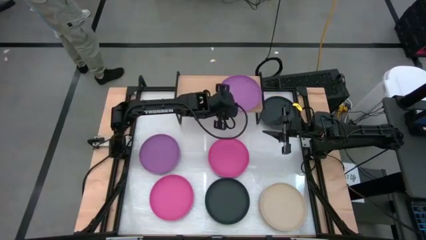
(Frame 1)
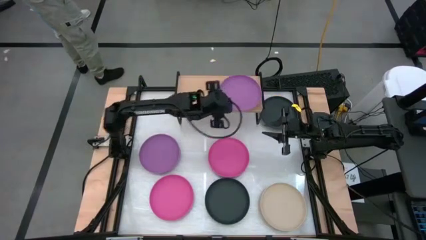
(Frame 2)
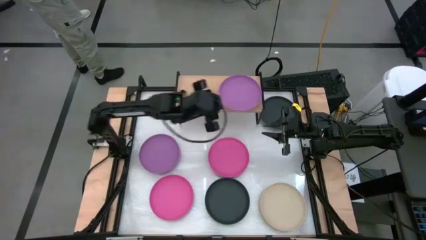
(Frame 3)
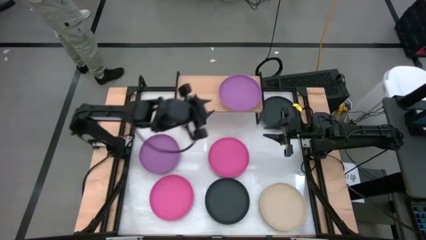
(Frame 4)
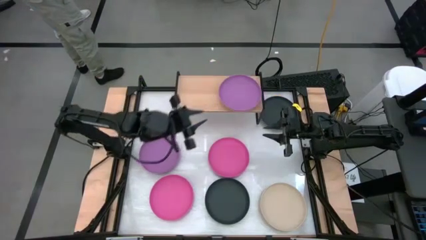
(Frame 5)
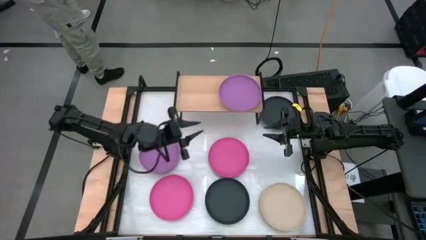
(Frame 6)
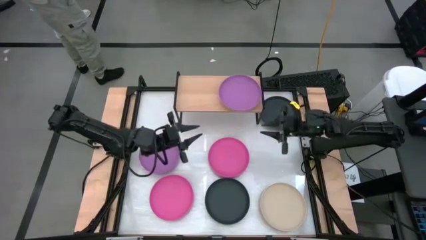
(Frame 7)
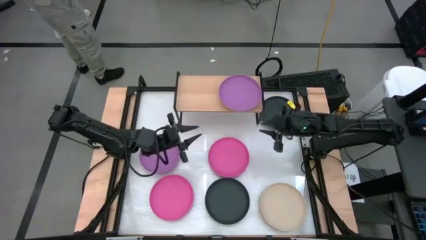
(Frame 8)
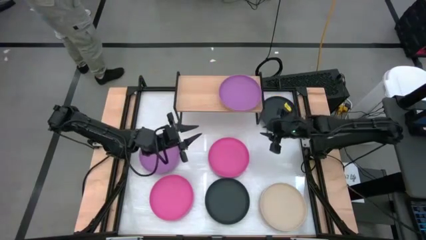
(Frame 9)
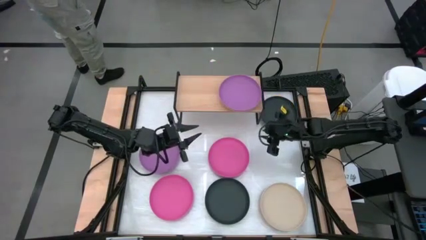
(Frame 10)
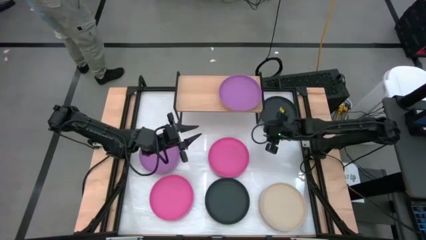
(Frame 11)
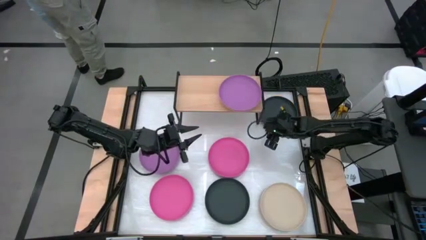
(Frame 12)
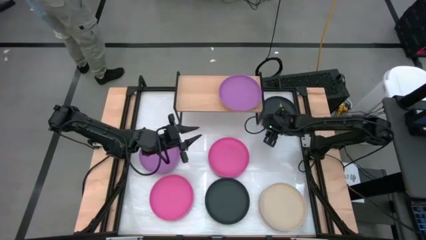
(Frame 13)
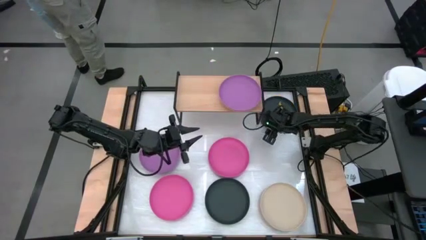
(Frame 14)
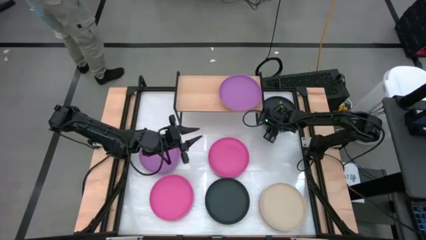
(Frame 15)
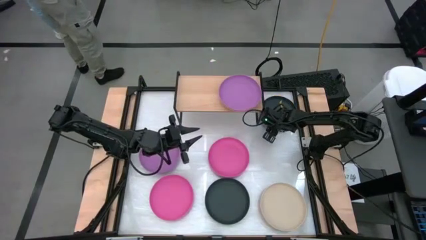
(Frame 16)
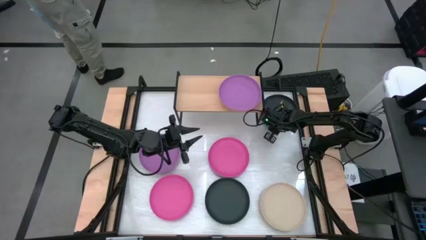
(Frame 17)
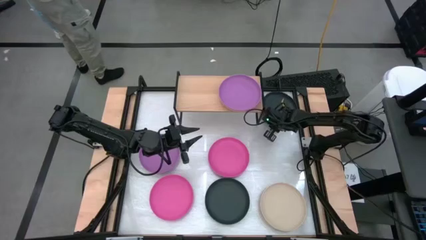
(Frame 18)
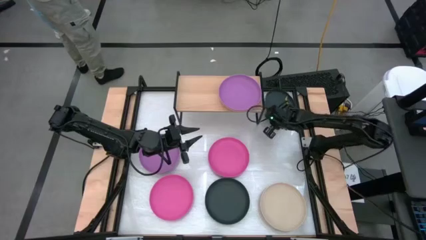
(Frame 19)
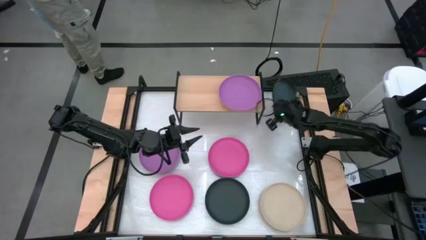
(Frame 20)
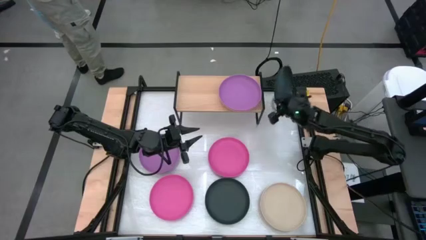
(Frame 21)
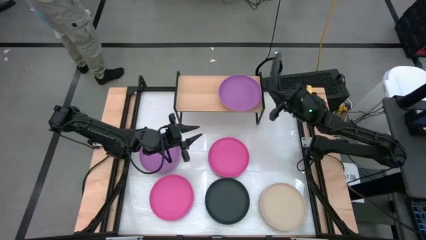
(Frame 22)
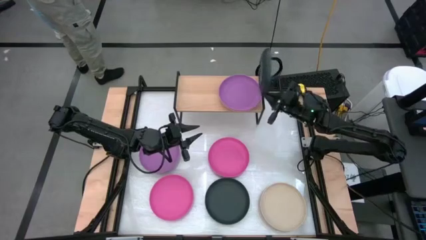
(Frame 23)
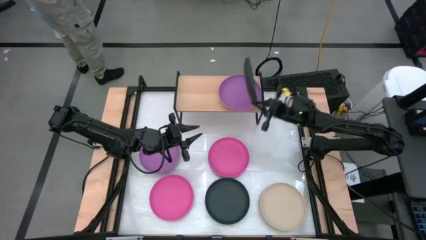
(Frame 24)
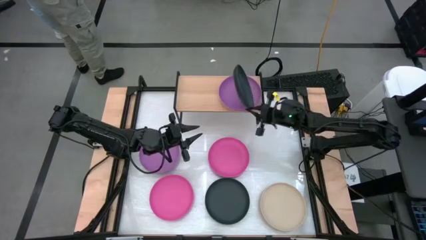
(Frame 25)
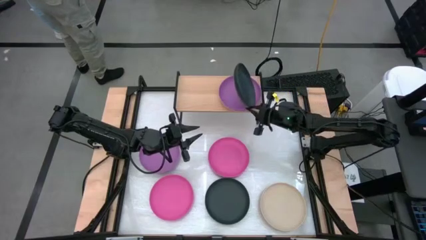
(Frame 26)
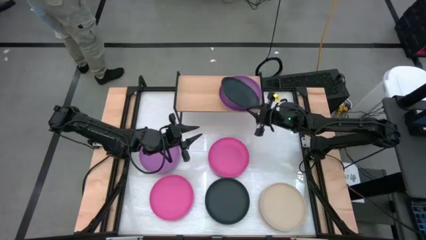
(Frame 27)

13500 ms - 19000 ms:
Task: Place and stack plates onto a shelf
Stack the top black plate on top of the purple plate on the shelf

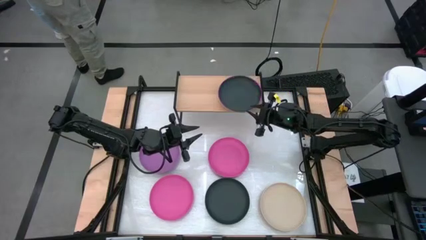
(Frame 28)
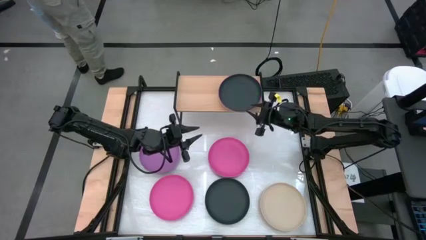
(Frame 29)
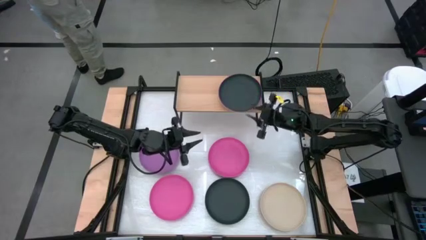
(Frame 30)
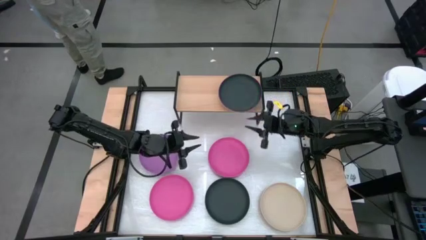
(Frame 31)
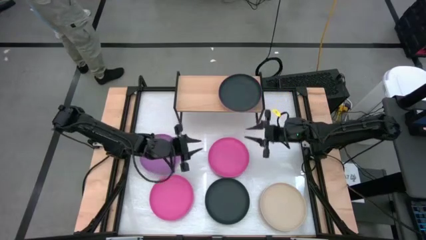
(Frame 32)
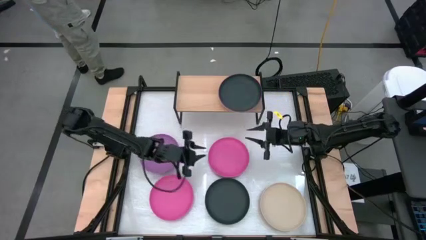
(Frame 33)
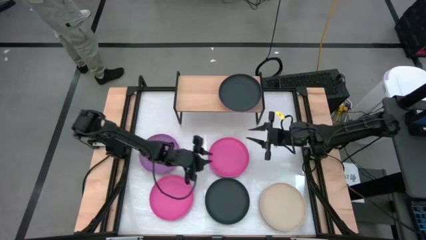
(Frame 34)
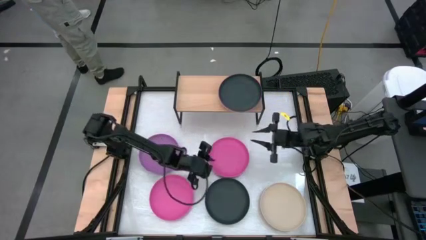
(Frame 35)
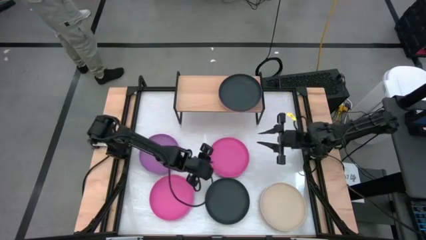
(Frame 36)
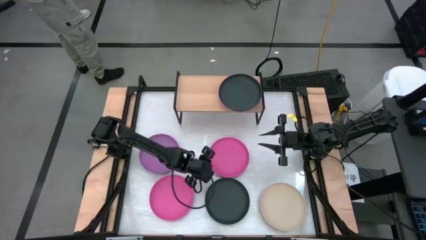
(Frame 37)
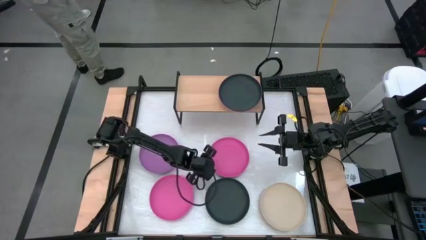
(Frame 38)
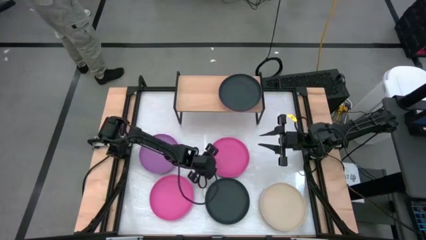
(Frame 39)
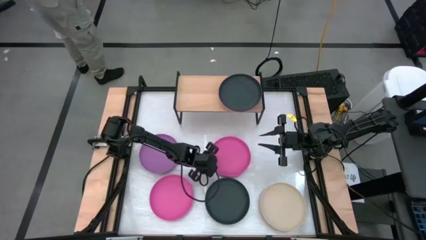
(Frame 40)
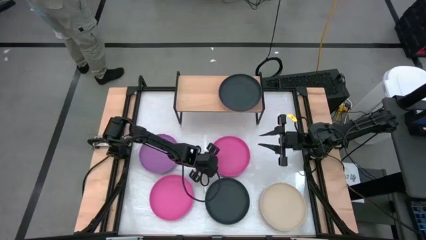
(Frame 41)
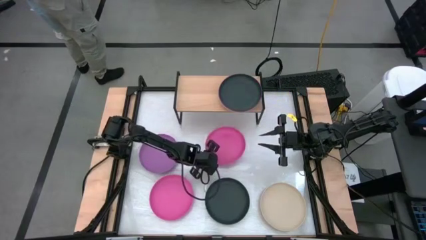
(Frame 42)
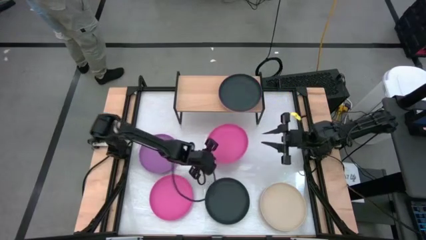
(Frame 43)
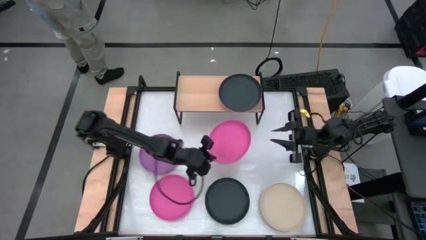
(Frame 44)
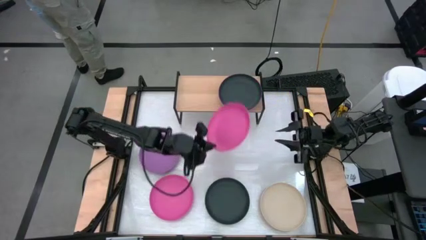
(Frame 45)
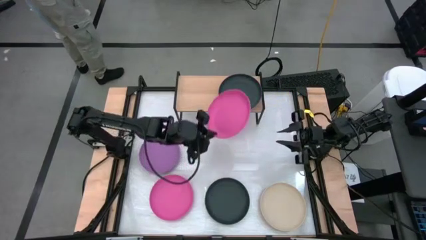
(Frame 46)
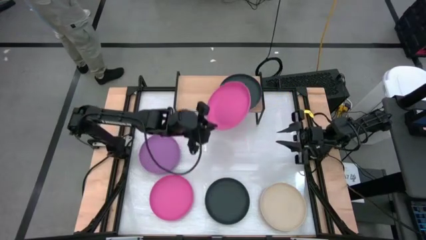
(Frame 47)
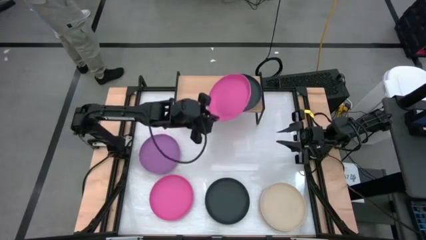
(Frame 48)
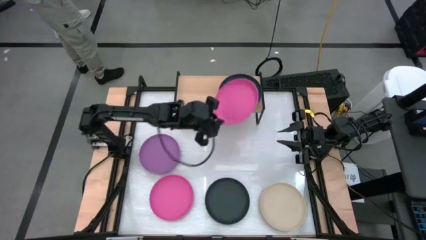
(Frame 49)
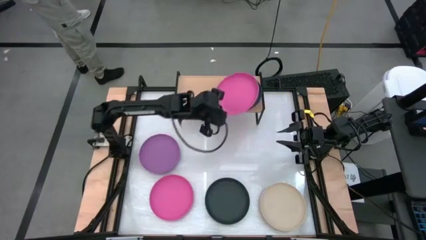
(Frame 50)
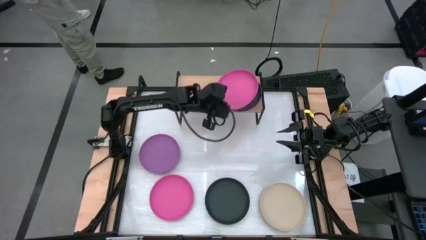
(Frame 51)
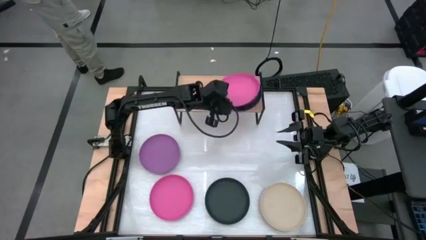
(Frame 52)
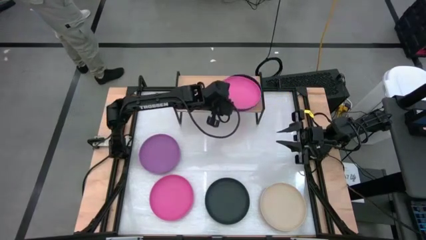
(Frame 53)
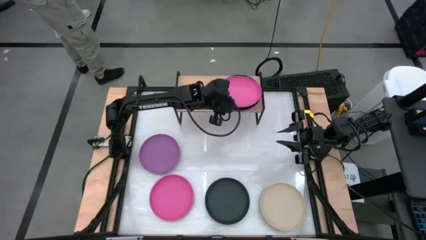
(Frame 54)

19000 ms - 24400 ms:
Stack the top pink plate on top of the black plate on the shelf

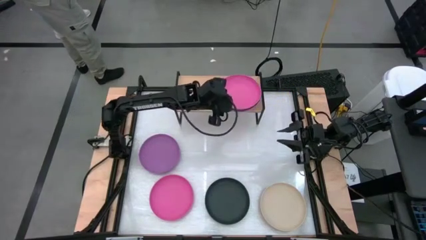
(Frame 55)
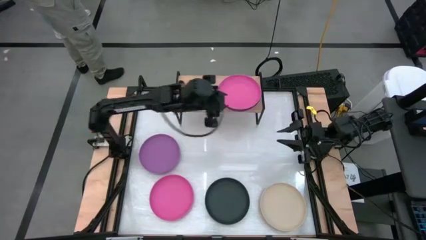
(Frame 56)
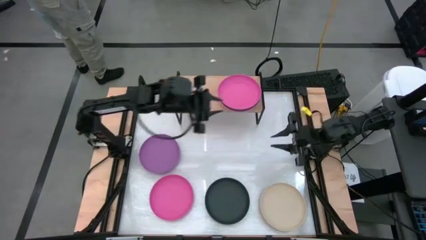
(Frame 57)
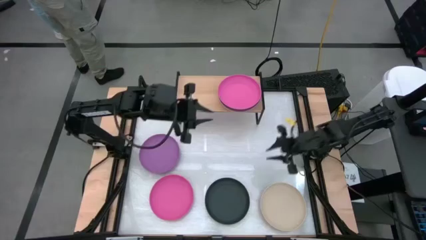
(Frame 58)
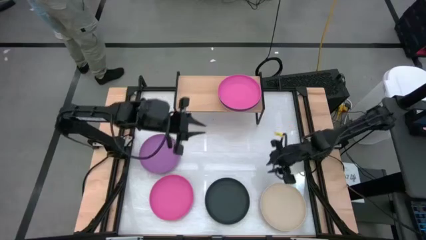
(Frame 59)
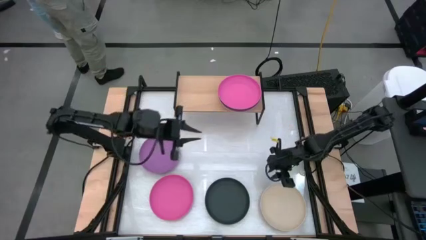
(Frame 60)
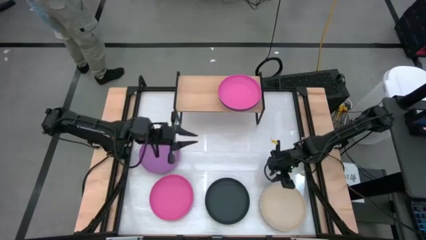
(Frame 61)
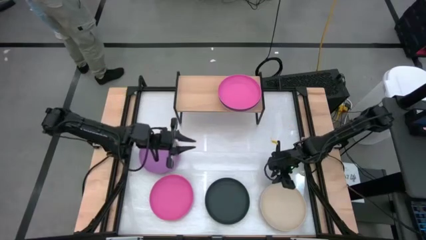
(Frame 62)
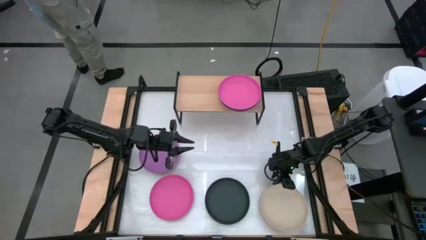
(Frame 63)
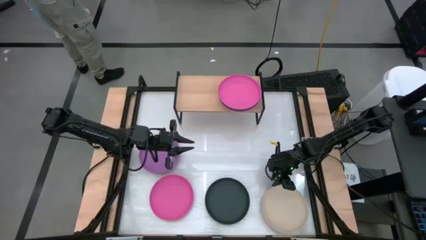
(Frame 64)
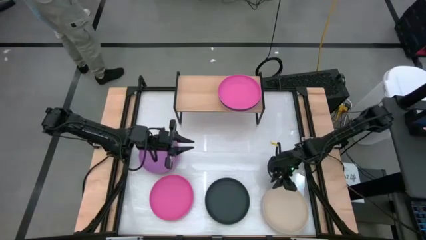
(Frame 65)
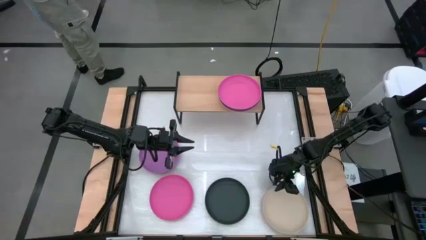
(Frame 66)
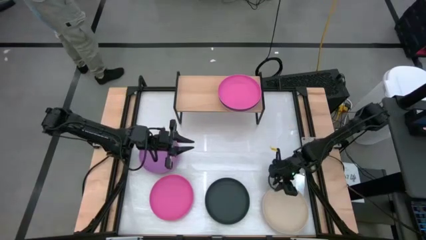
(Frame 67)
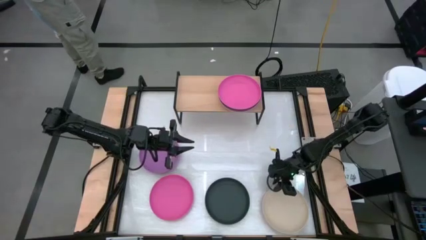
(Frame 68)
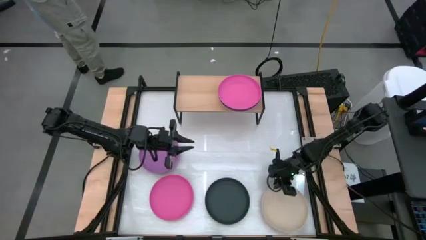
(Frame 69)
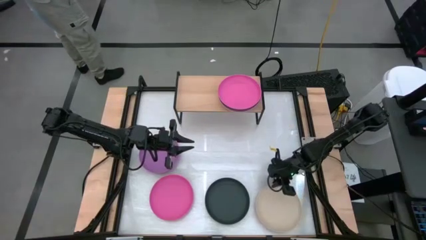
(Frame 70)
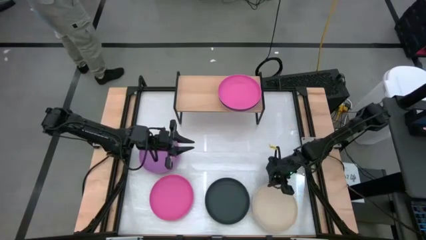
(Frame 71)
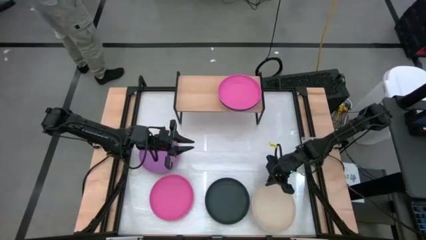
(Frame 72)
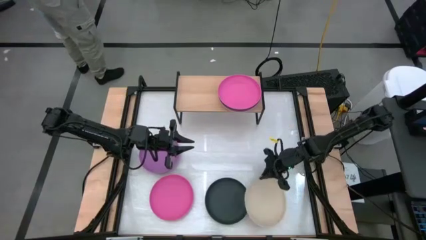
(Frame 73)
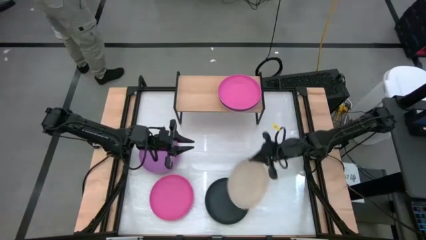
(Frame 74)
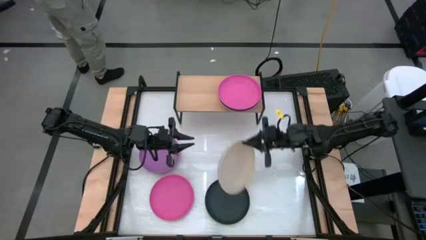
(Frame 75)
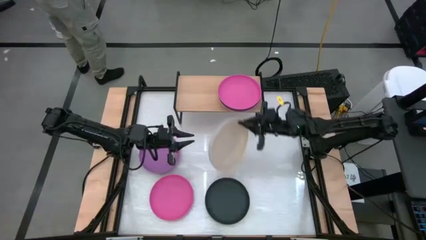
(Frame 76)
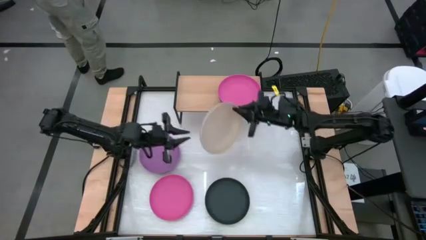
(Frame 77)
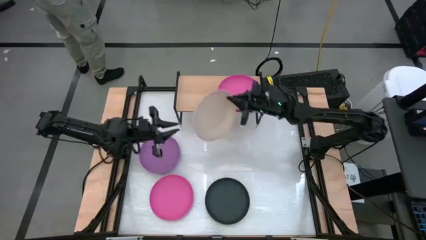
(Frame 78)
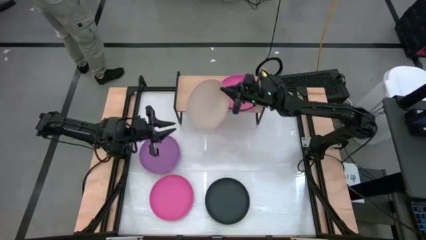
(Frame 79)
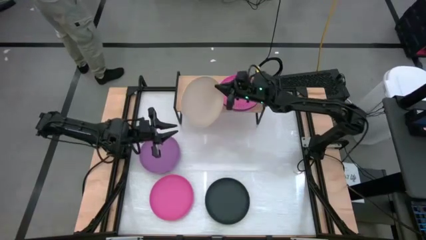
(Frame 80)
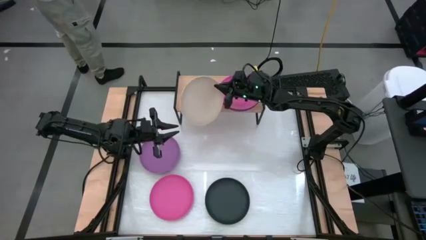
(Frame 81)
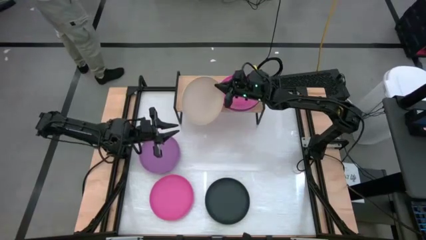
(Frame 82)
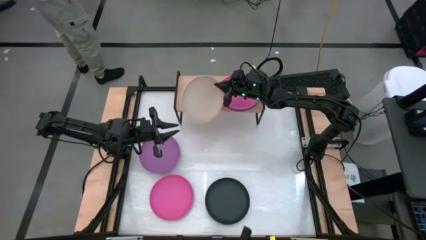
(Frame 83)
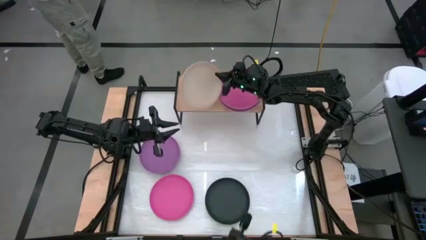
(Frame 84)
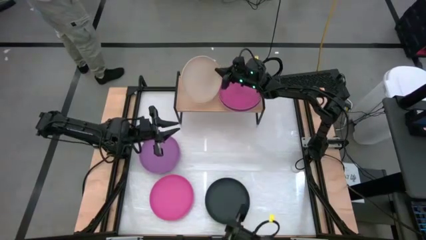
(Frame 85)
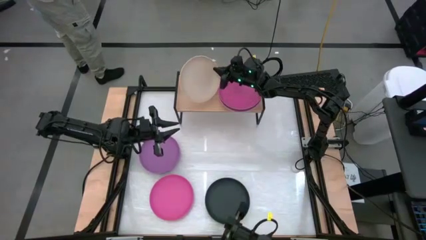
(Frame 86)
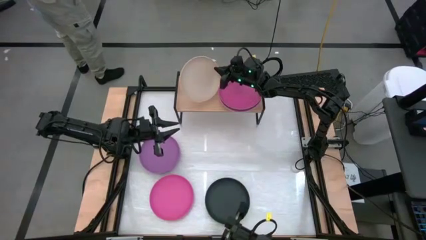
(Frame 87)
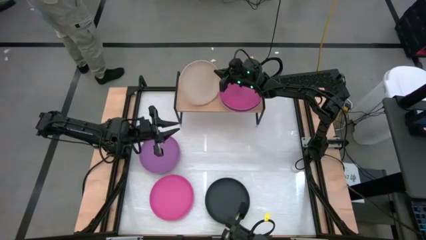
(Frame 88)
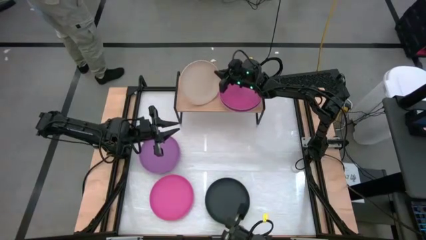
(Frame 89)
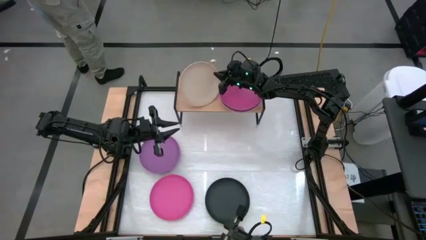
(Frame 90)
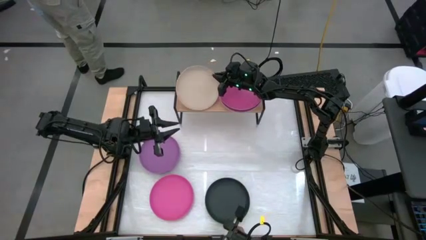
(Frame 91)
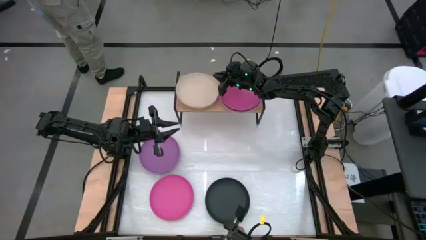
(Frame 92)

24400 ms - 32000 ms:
Put the light gray plate on the shelf
